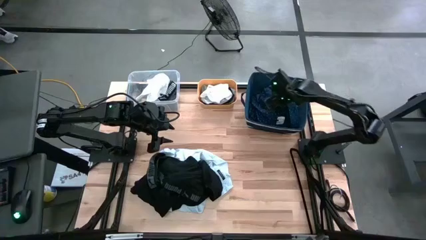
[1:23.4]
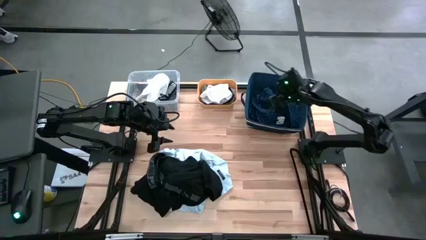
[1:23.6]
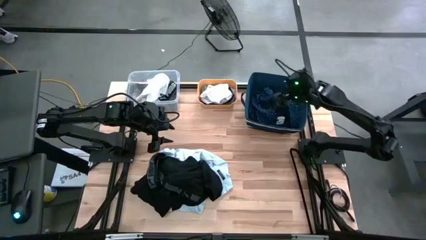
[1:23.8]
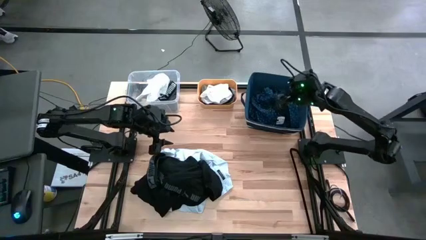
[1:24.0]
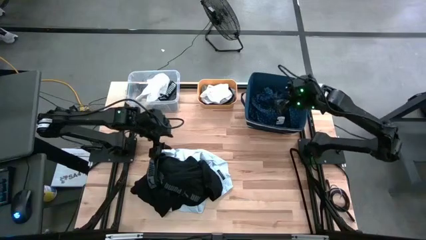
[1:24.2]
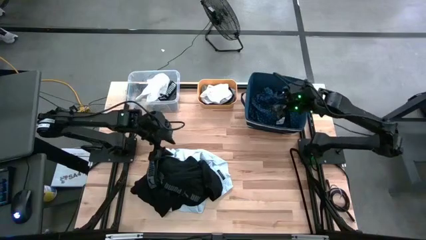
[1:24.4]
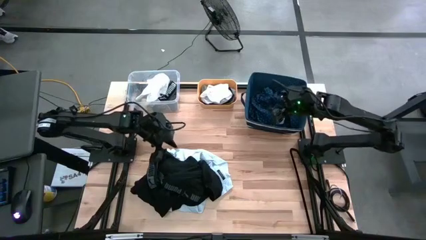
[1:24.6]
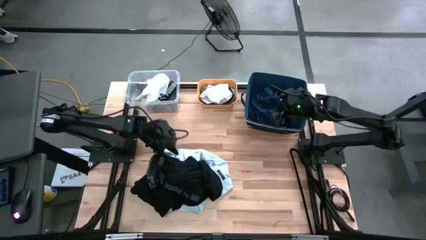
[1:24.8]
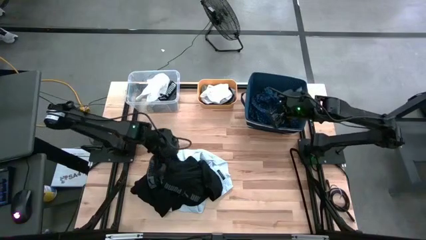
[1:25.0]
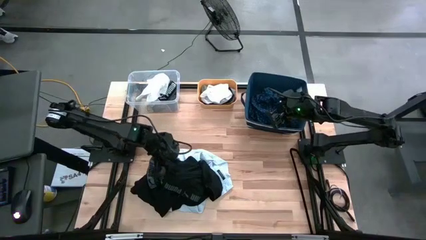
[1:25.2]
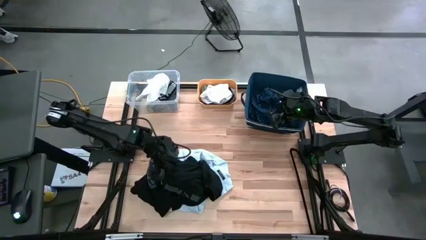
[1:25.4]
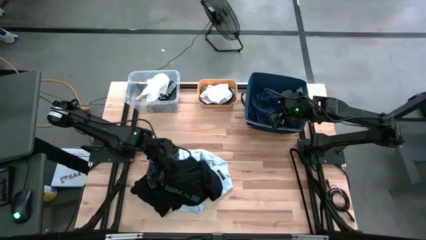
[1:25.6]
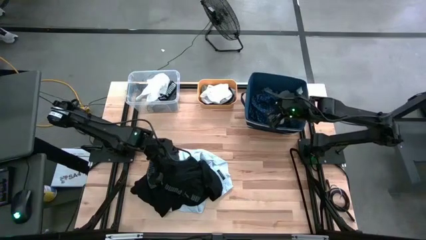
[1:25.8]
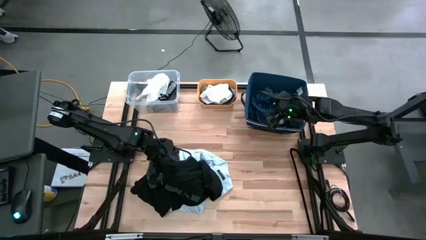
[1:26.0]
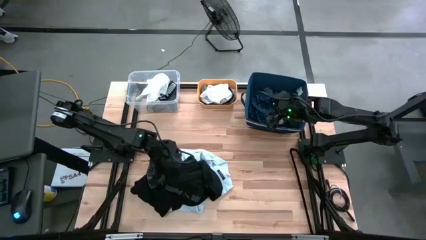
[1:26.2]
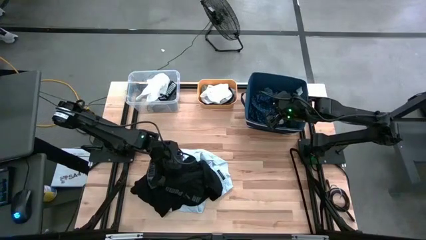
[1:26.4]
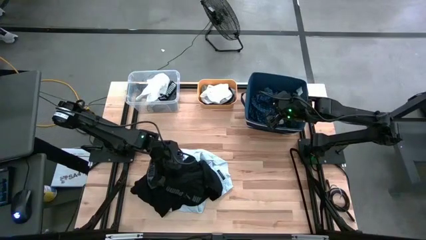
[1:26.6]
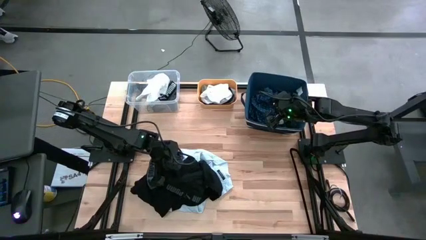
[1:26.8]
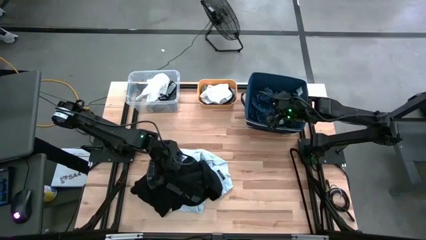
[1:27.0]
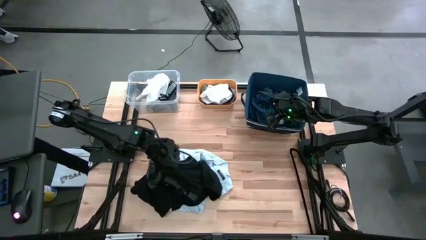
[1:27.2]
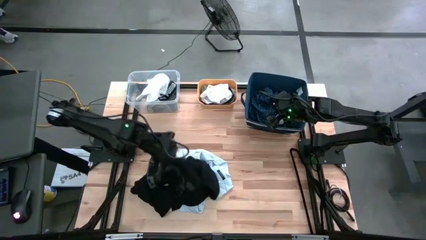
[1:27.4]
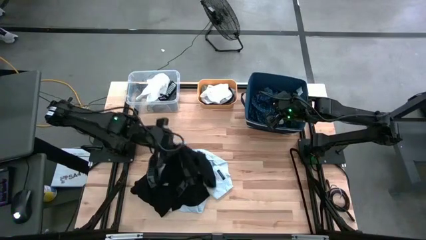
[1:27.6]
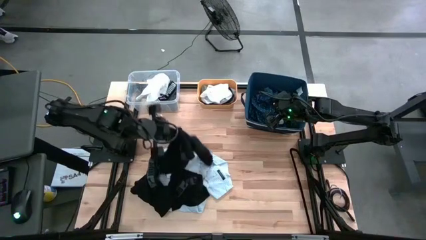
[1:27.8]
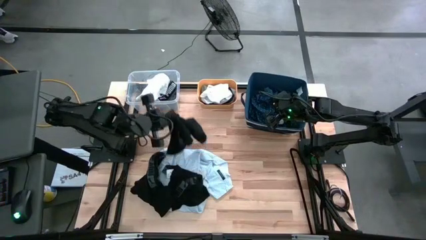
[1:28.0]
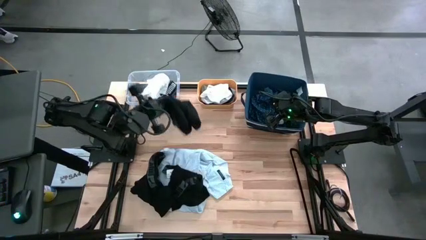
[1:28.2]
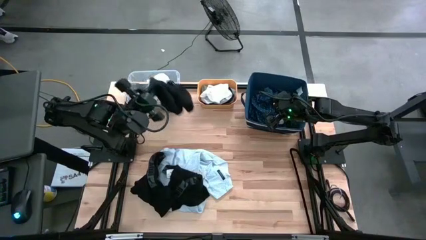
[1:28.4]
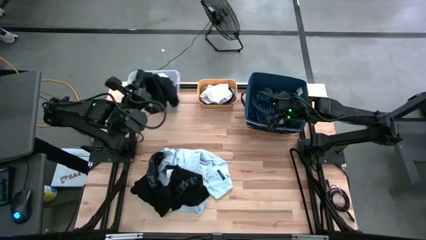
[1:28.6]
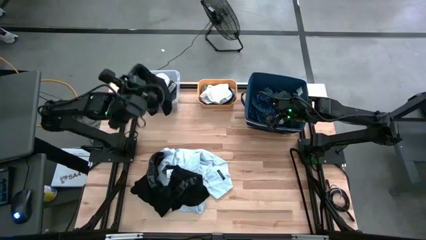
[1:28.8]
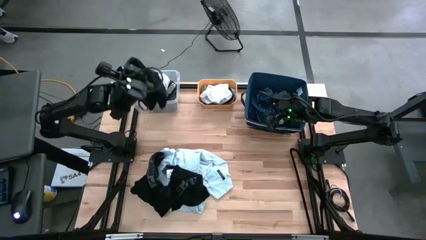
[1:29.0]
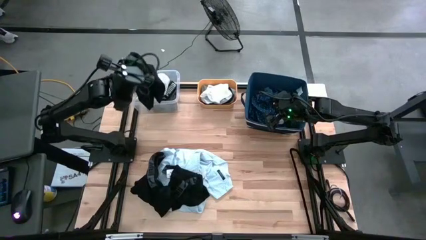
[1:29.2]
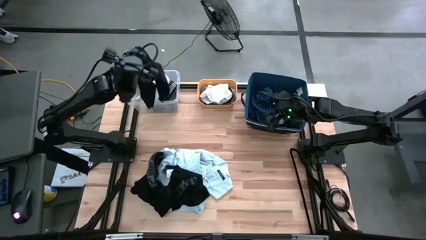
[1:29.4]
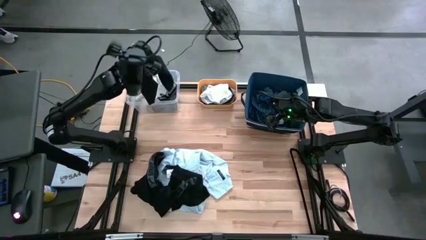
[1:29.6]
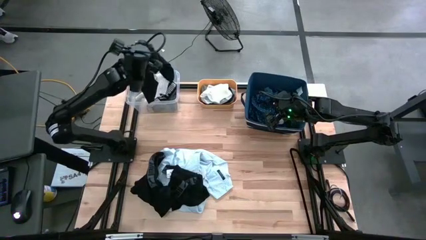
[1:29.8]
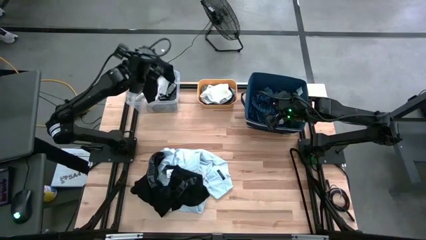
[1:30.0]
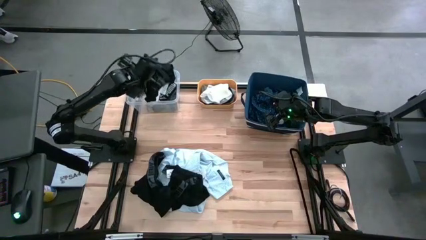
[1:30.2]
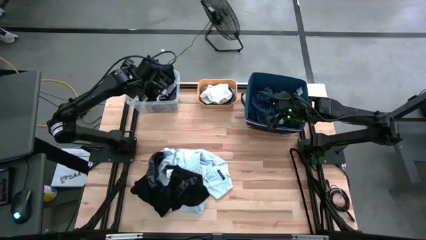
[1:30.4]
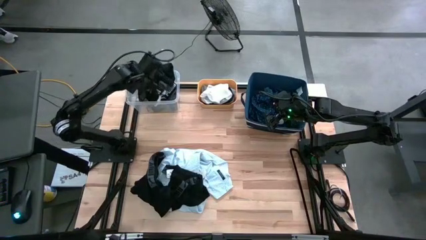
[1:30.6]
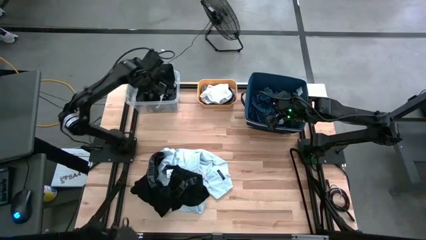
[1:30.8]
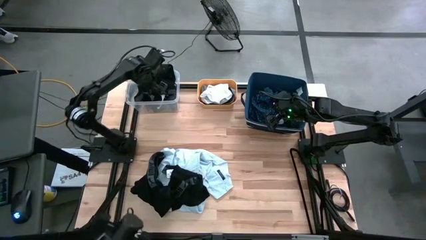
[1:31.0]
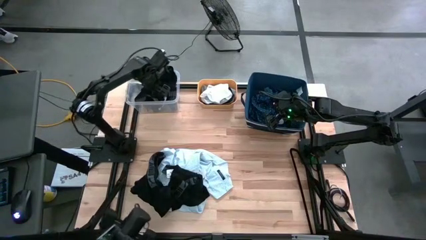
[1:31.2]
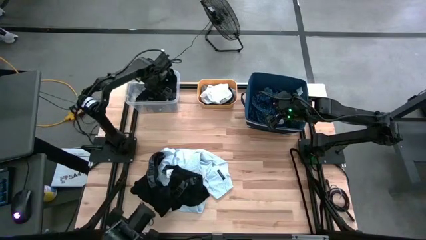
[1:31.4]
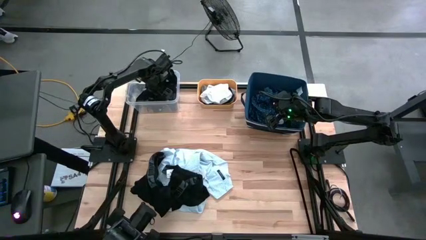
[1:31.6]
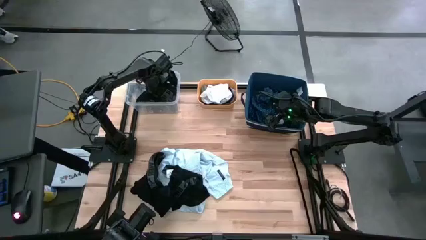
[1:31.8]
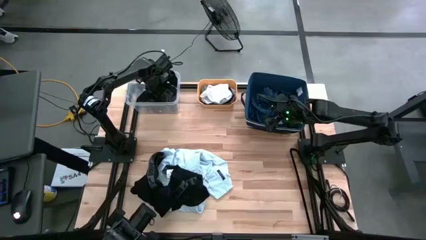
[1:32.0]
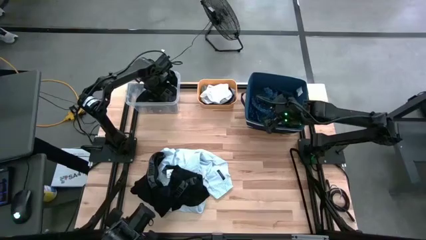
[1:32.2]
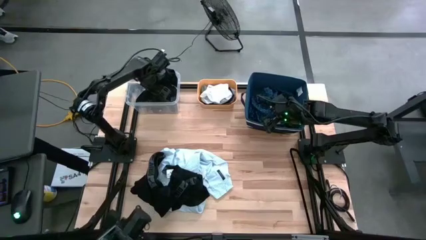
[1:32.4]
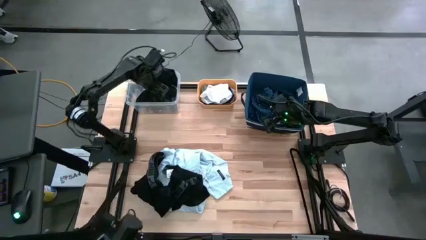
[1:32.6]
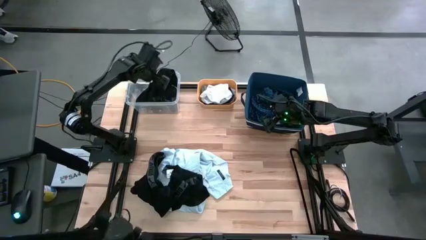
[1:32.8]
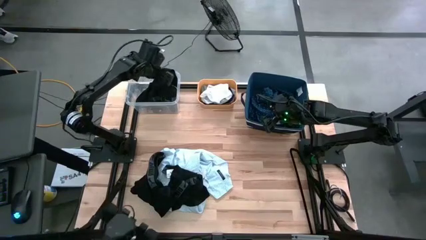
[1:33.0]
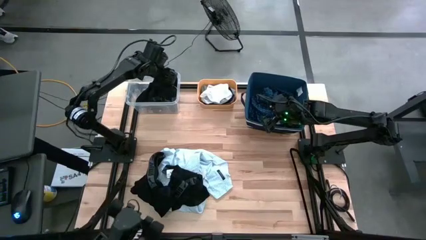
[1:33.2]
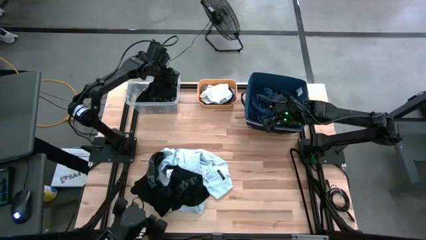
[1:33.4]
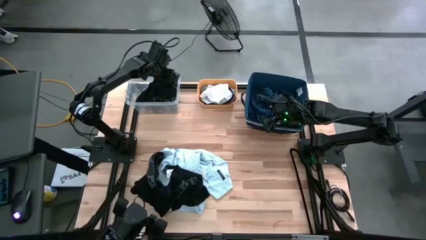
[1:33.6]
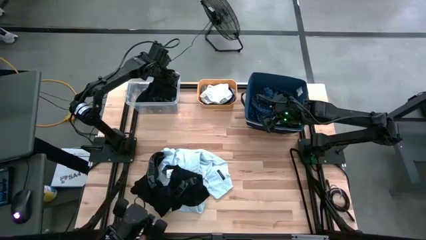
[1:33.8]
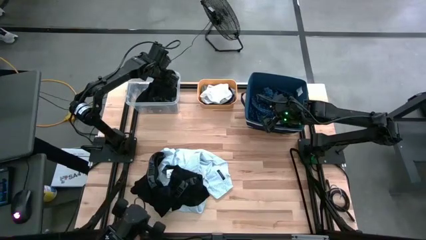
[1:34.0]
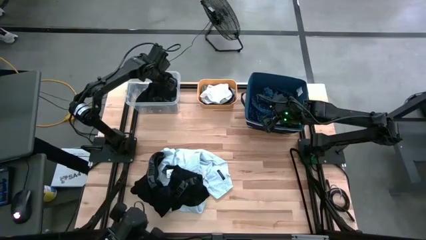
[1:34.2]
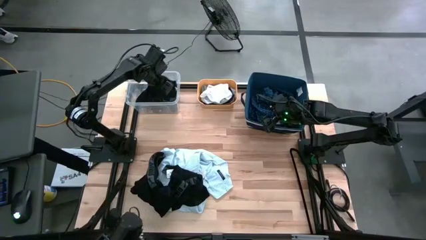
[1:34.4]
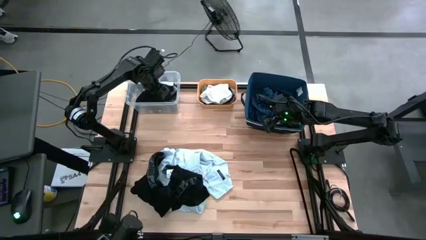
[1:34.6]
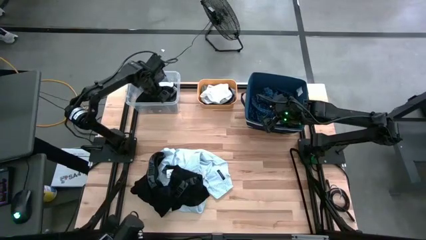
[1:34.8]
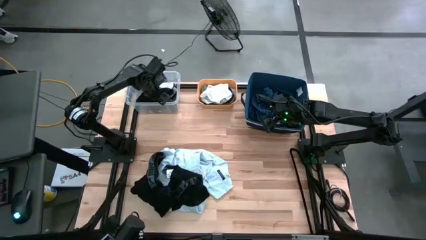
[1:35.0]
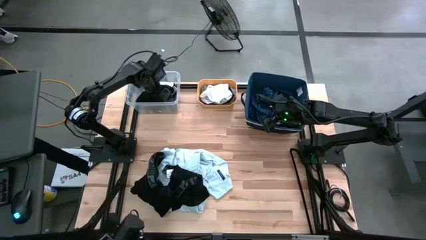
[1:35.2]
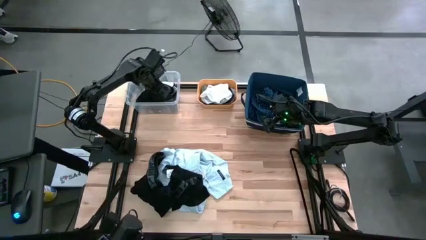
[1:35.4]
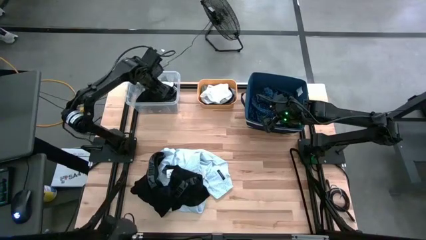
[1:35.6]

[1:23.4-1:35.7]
Task: Pick & Place Cloths
Put the black underwear into the transparent bin
